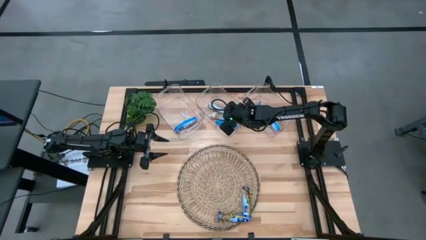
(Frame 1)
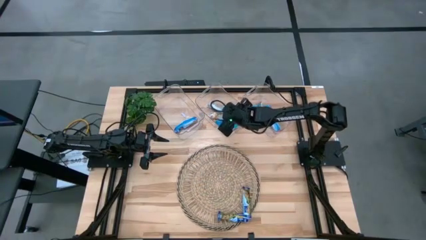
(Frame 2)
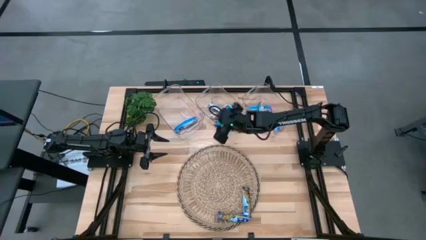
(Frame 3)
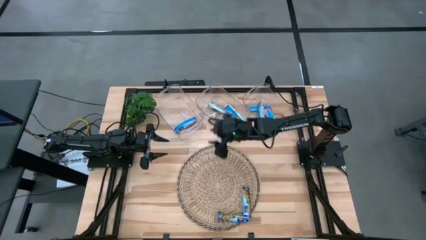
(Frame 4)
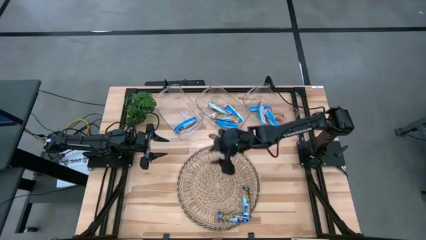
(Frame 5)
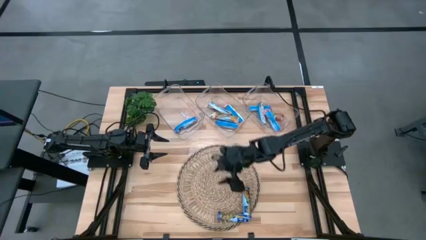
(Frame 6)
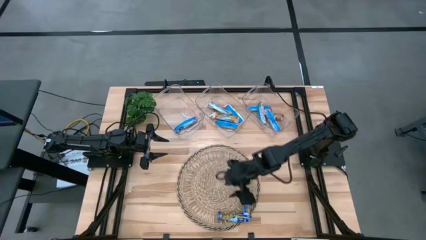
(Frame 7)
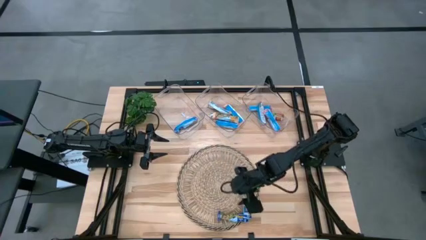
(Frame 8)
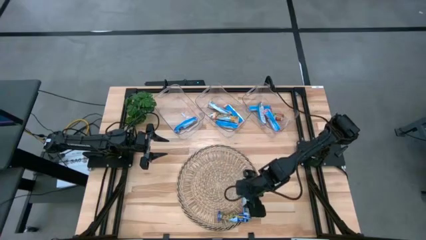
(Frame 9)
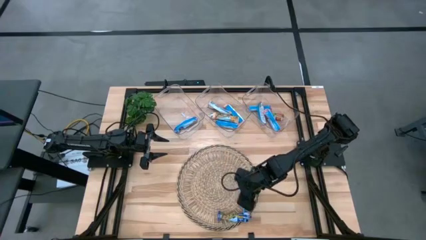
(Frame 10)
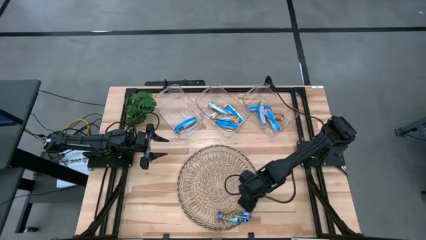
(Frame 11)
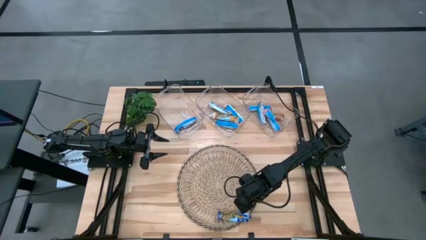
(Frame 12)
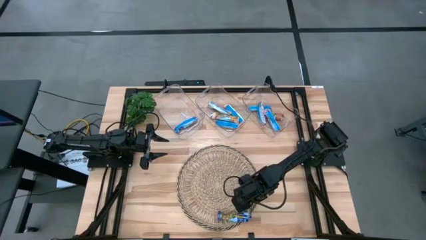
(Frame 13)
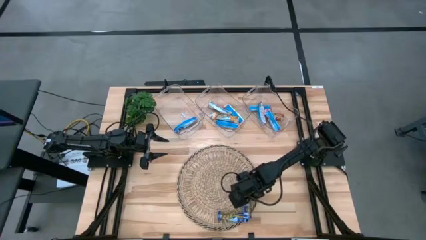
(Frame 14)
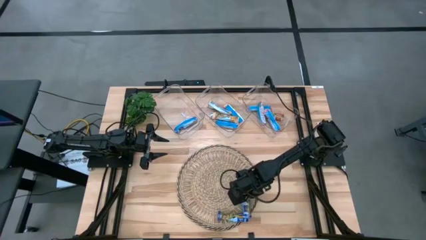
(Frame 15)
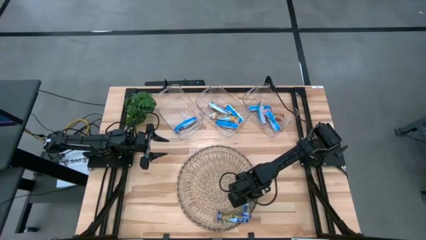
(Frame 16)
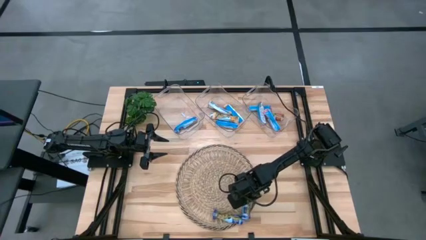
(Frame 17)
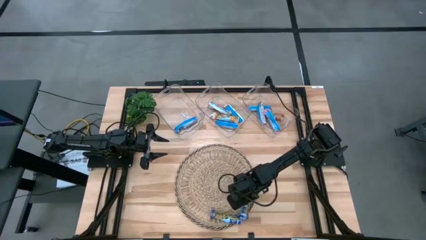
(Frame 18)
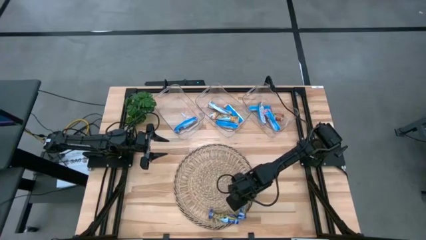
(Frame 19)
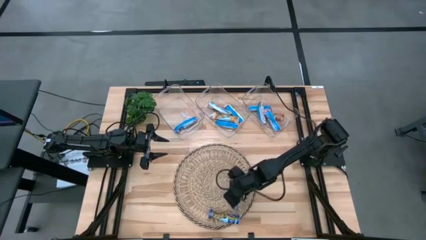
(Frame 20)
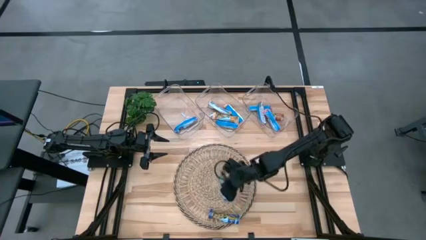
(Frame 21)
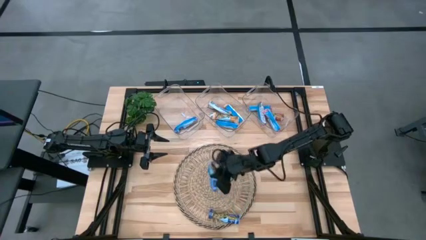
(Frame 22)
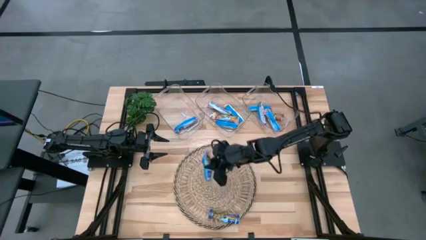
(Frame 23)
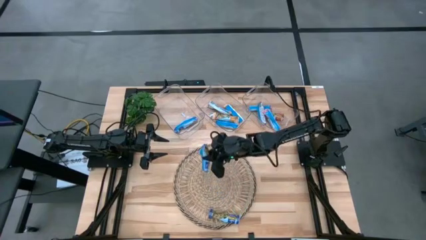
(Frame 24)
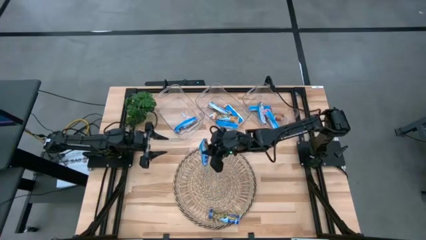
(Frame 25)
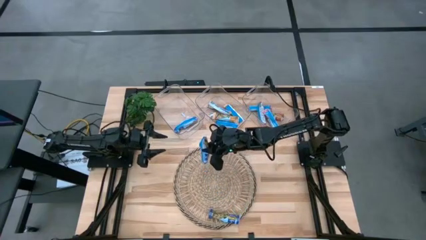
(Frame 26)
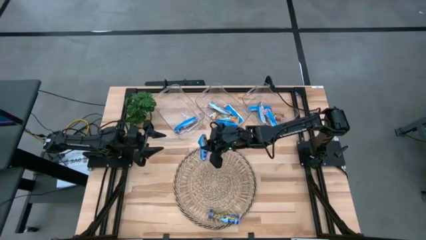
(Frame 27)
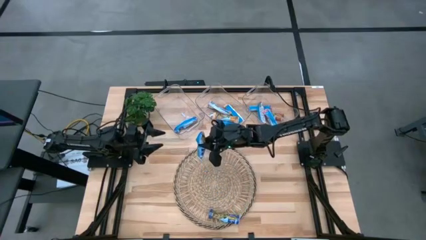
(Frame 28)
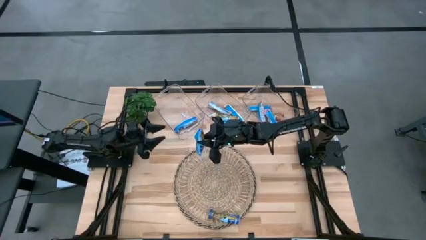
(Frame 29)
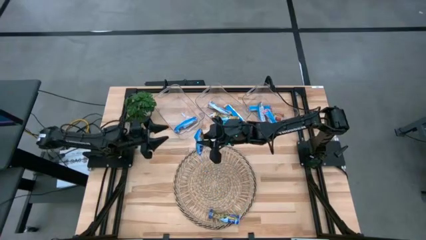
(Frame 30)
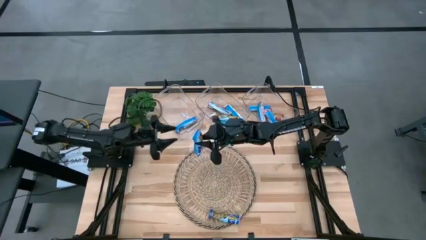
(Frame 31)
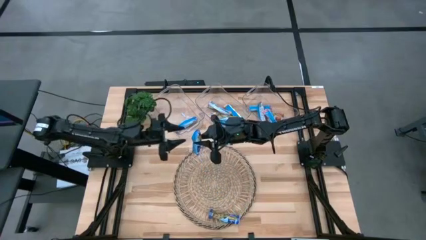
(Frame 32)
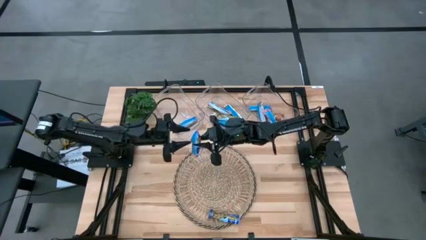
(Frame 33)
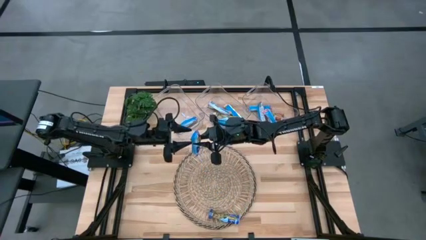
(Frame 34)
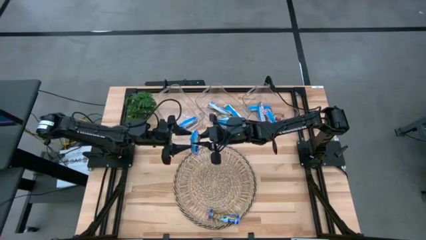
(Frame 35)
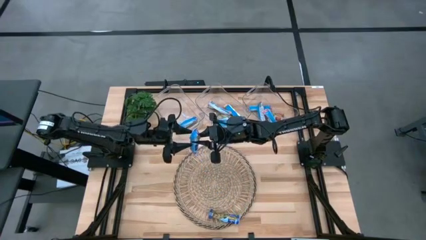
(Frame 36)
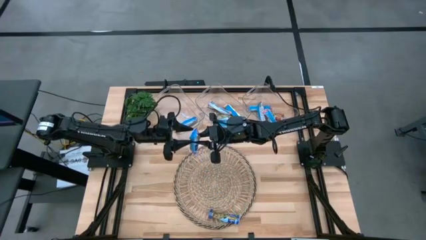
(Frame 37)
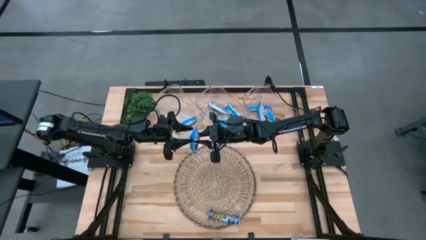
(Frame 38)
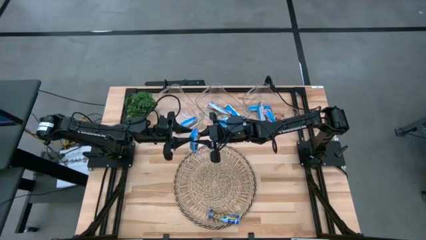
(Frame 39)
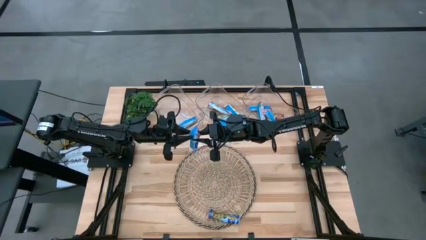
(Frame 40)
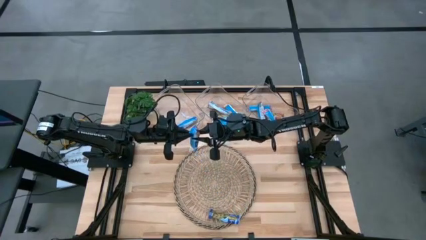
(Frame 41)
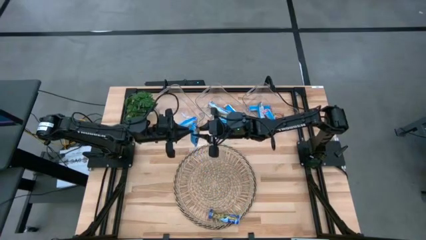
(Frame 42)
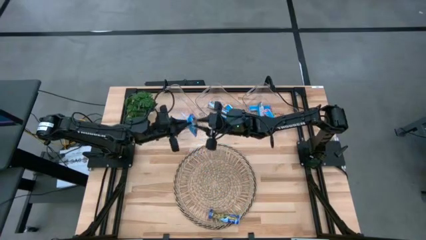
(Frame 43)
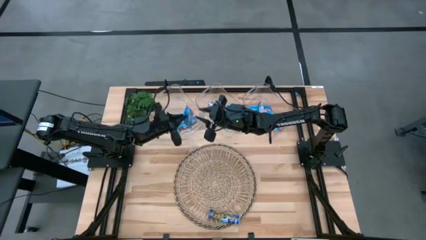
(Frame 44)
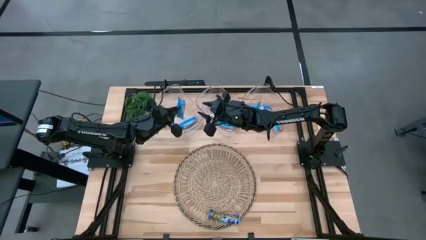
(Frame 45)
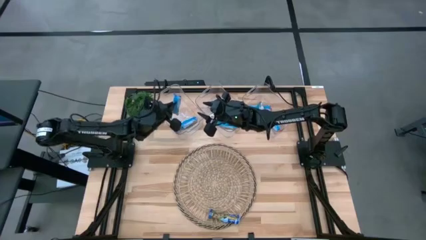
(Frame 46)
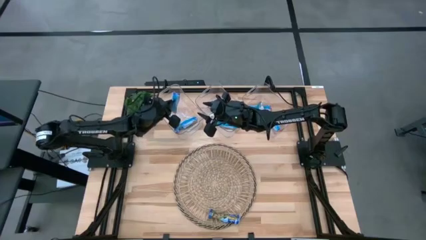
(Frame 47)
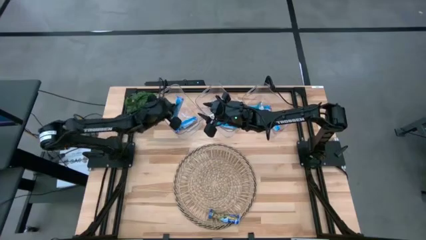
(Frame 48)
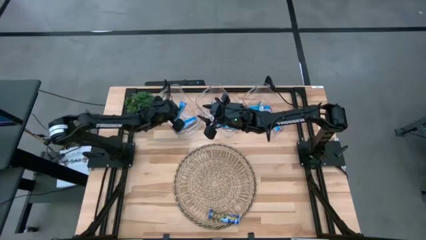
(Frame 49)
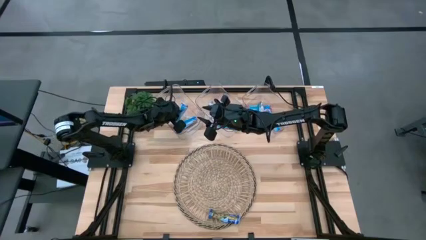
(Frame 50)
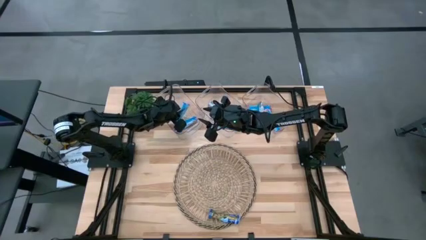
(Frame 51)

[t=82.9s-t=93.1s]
Task: Pick and place Granola Bars by type
Put the blue granola bar into the left transparent bin

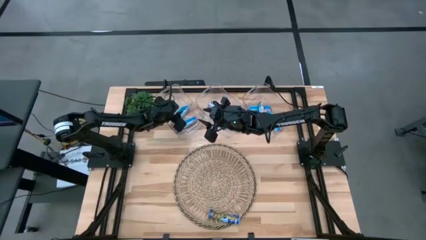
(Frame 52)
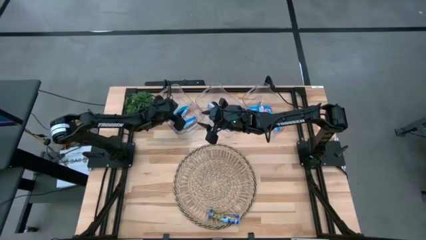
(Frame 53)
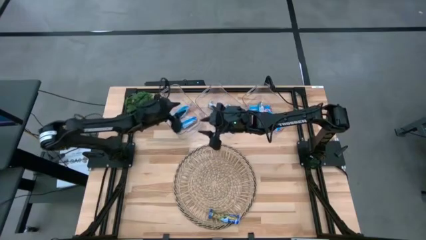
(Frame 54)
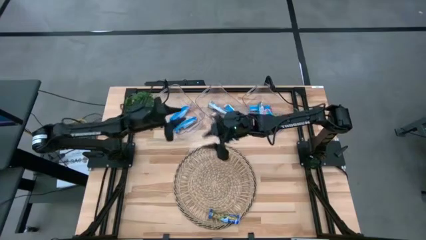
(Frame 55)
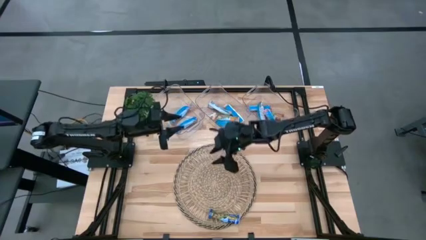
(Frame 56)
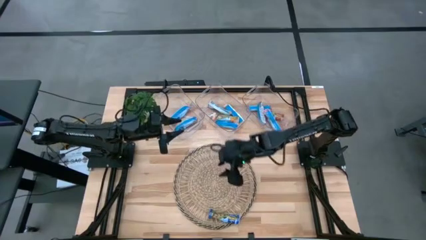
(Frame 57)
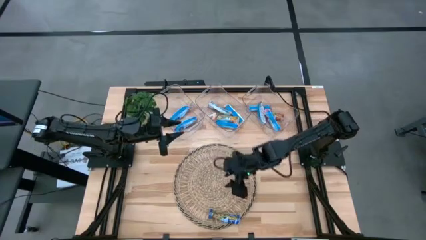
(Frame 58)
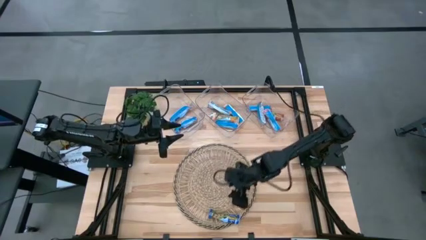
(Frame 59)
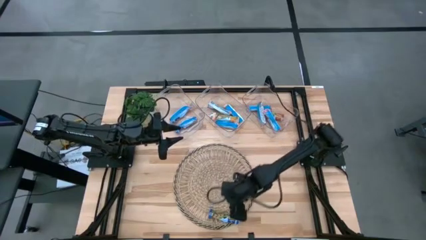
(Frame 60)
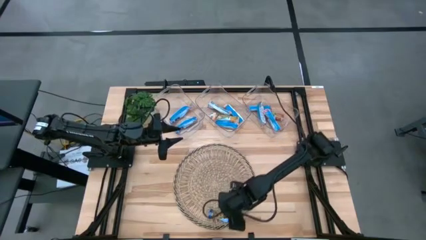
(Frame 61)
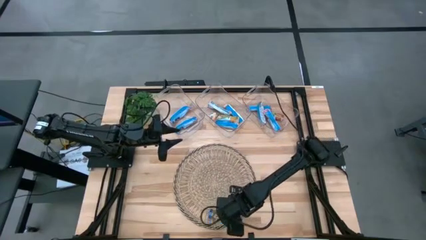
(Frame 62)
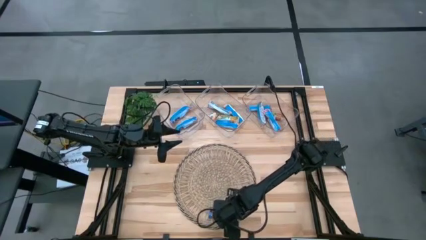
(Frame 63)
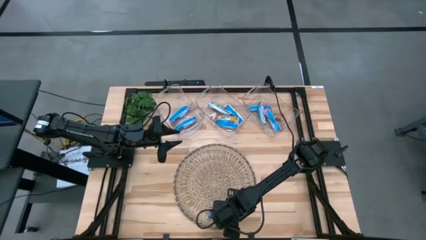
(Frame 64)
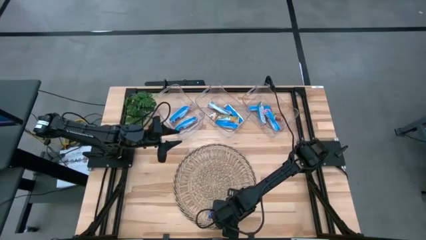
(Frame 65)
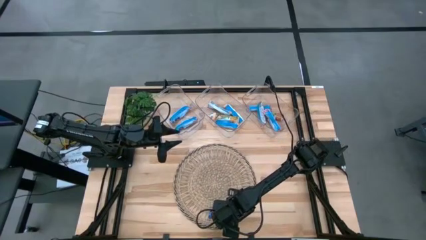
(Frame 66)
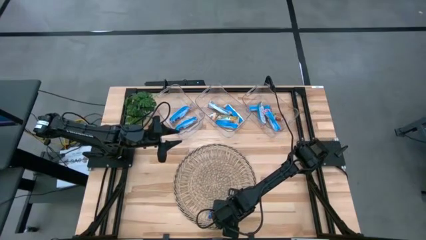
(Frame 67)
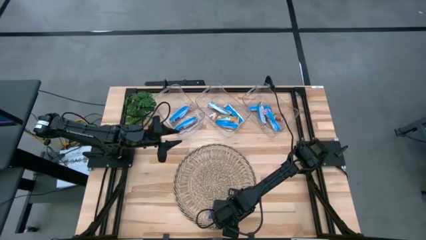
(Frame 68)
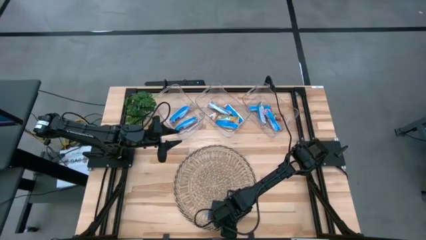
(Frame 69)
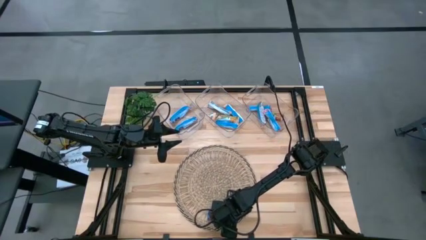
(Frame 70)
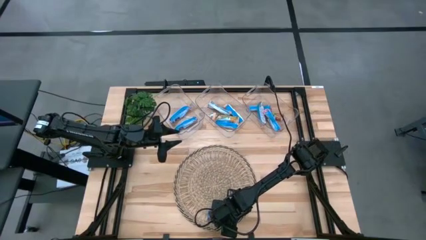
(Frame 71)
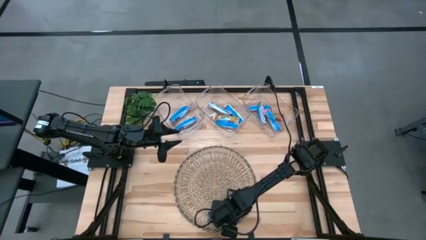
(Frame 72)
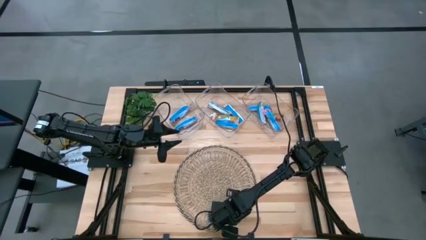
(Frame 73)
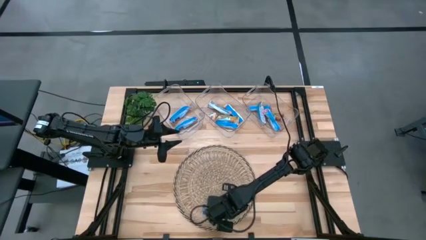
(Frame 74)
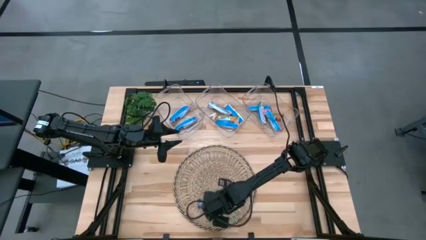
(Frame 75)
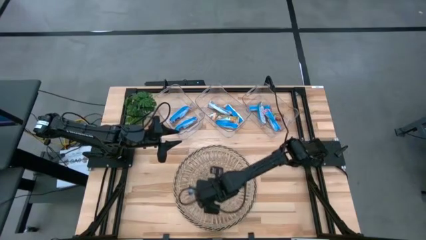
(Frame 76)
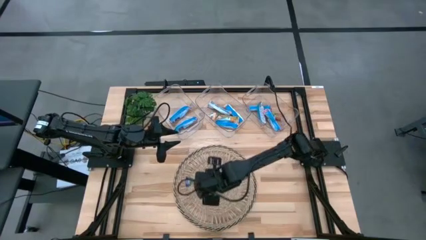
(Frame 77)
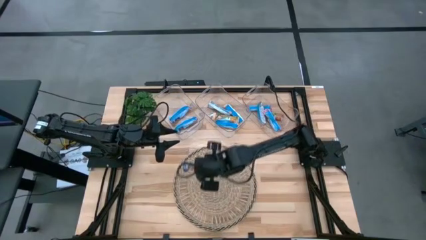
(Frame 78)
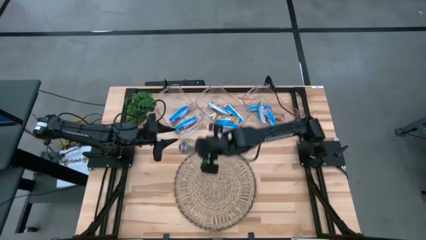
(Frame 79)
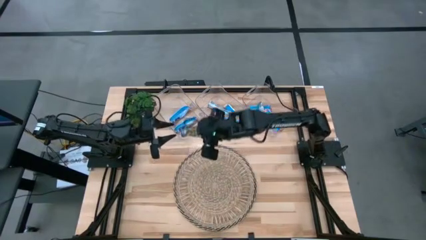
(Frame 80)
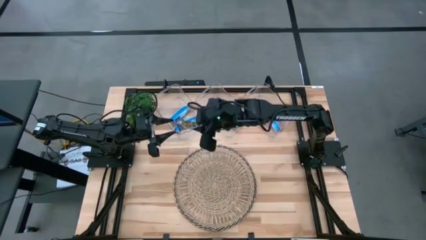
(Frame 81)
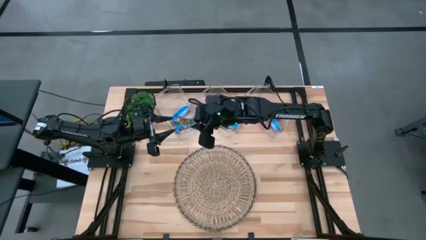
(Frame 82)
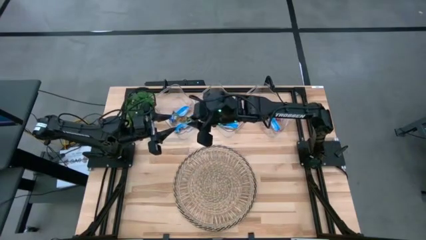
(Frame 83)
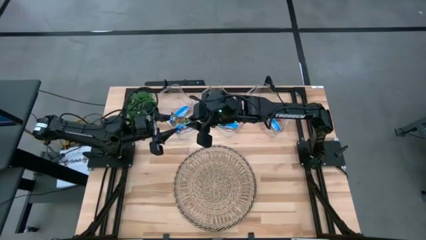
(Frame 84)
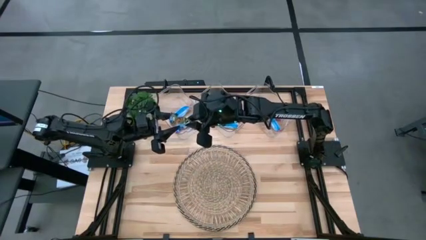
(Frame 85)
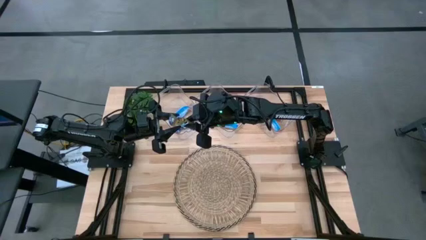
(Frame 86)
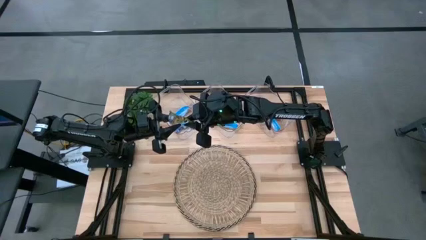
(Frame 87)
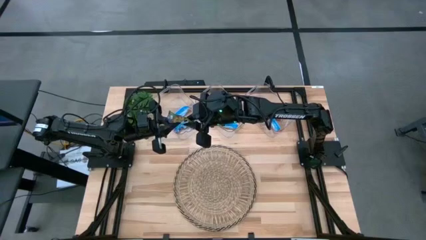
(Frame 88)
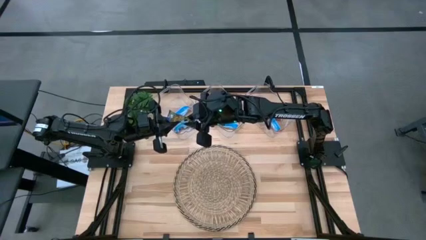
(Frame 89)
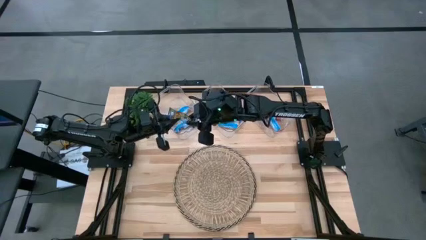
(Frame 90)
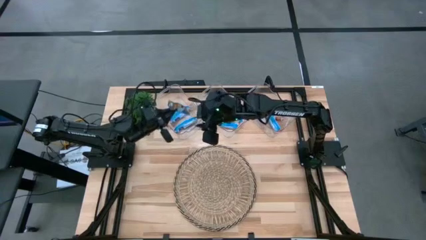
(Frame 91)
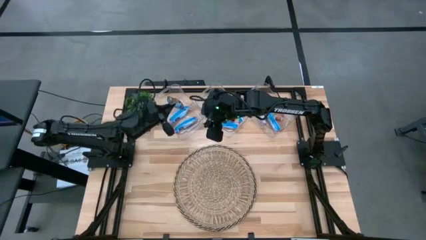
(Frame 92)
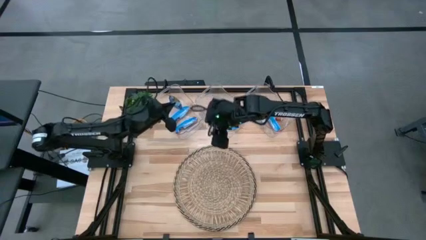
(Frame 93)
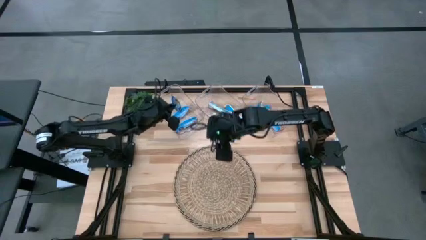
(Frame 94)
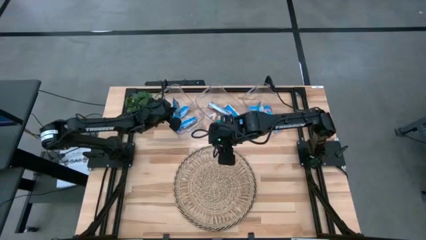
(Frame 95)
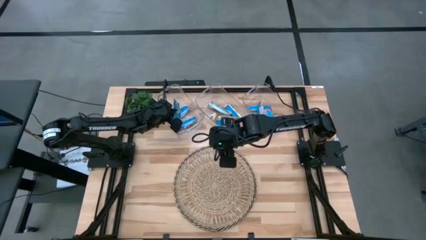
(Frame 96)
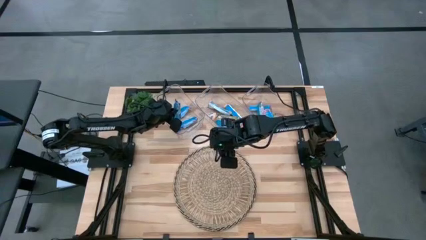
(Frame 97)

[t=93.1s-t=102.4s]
Put the blue granola bar into the left transparent bin
